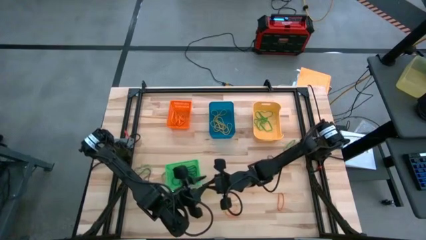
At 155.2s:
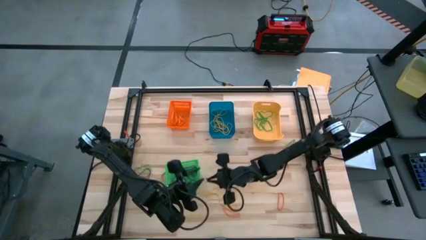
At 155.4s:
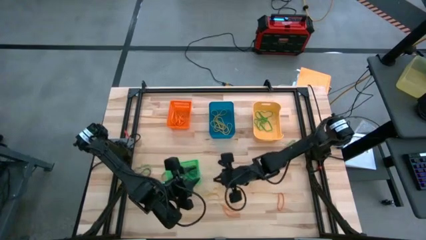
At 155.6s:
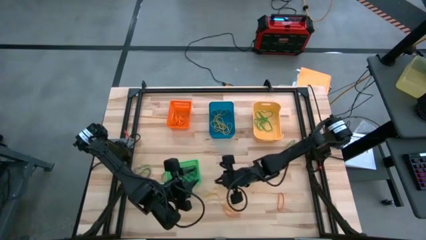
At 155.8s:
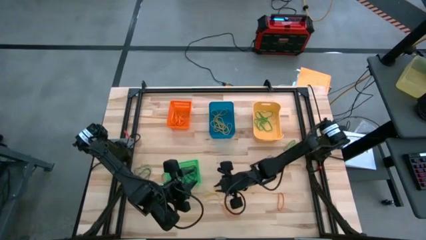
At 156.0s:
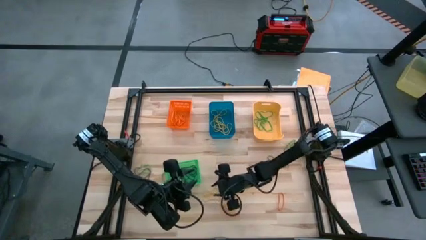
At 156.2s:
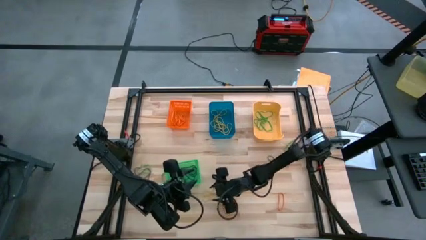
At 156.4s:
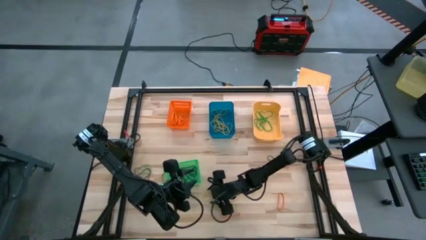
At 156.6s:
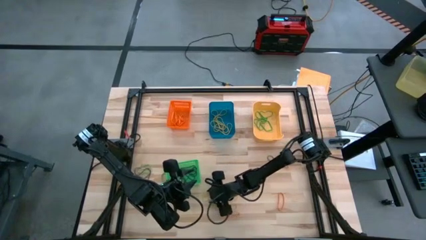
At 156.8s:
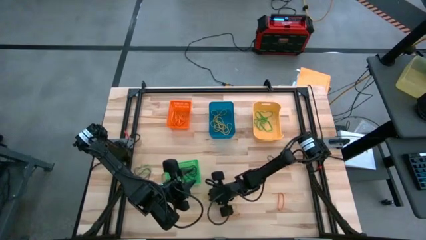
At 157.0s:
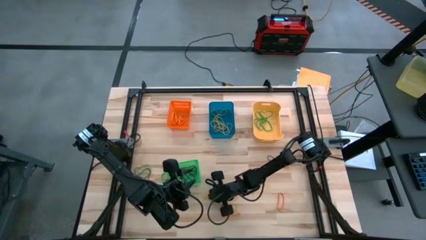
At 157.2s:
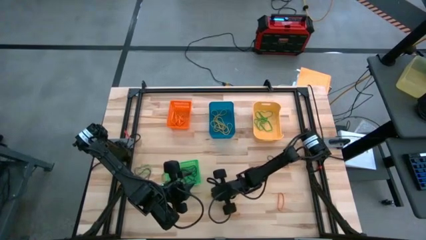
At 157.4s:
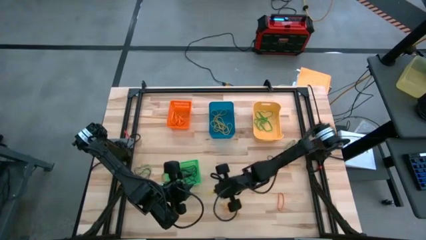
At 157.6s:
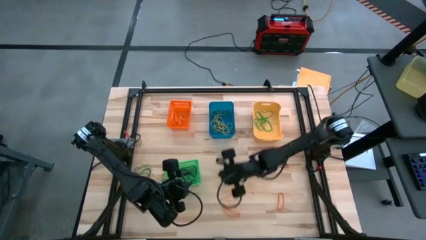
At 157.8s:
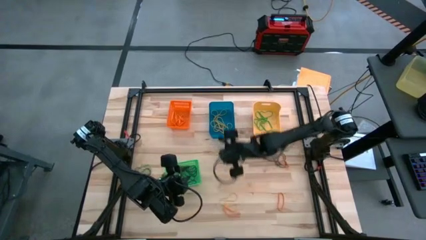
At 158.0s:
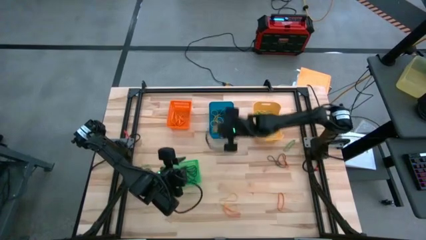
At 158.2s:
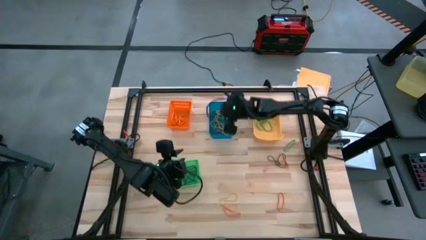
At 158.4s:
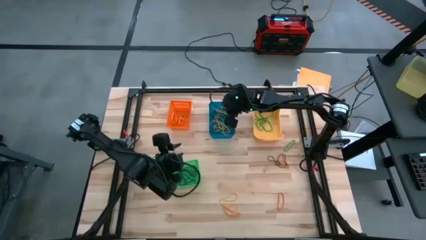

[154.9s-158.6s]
Task: Sort rubber bands into baskets
Put the yellow rubberband into the blue bin

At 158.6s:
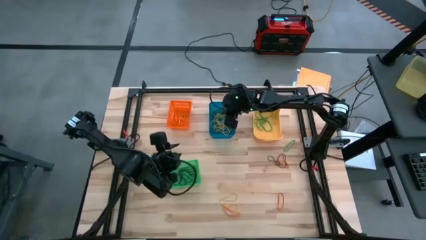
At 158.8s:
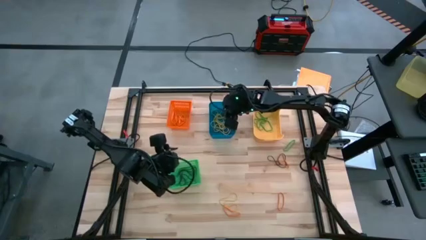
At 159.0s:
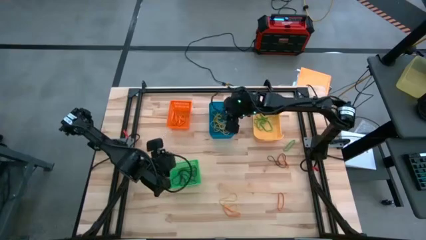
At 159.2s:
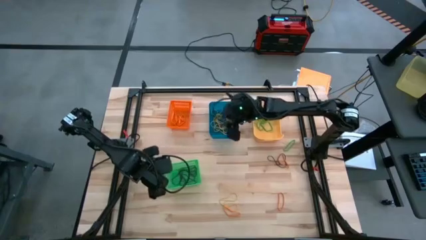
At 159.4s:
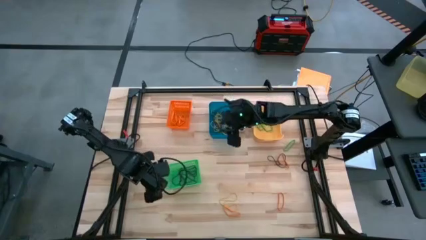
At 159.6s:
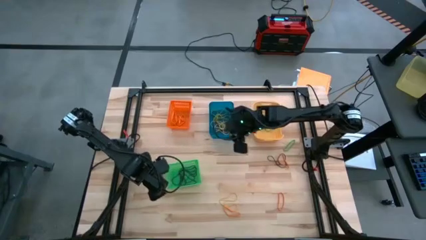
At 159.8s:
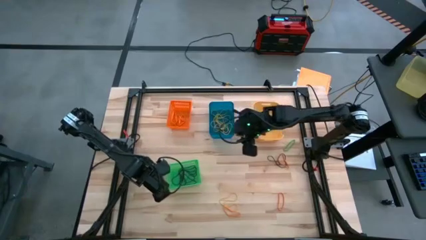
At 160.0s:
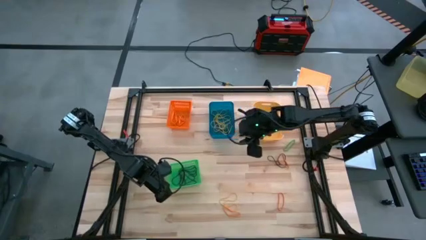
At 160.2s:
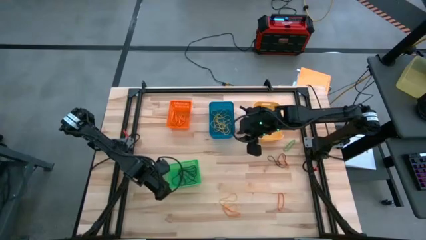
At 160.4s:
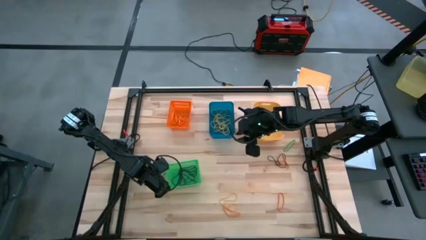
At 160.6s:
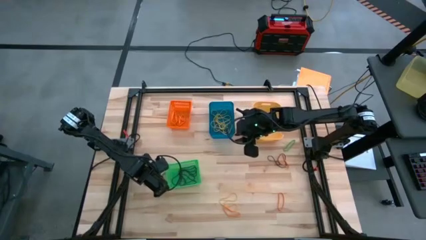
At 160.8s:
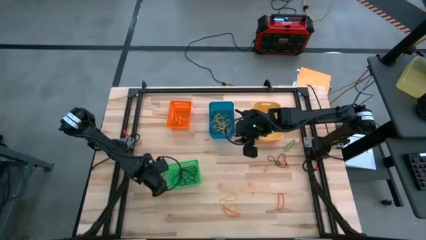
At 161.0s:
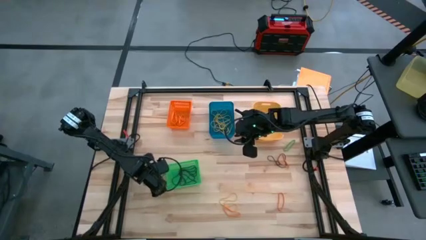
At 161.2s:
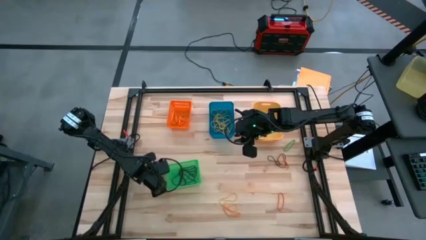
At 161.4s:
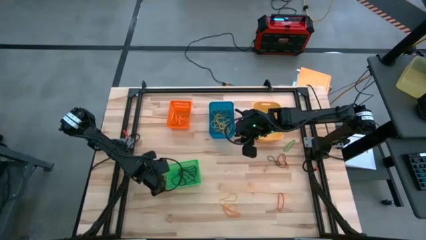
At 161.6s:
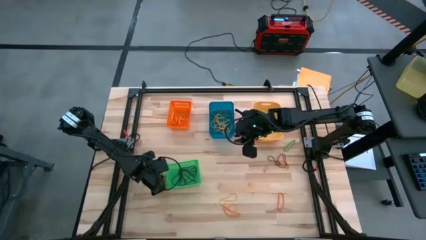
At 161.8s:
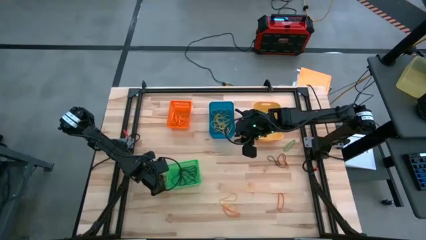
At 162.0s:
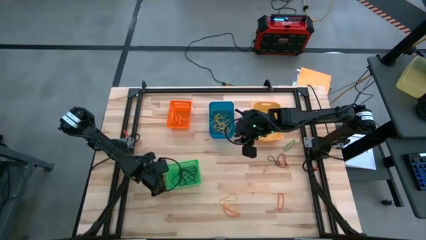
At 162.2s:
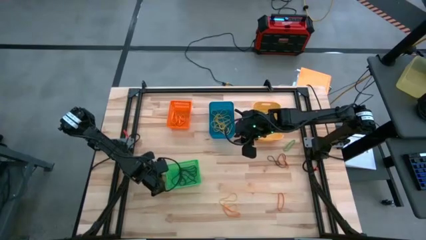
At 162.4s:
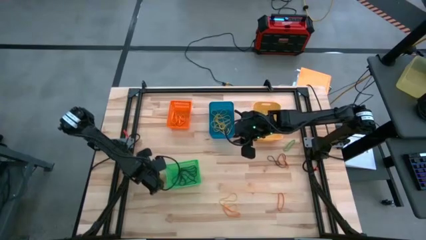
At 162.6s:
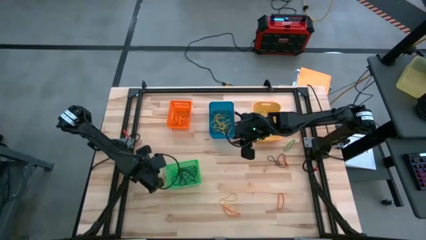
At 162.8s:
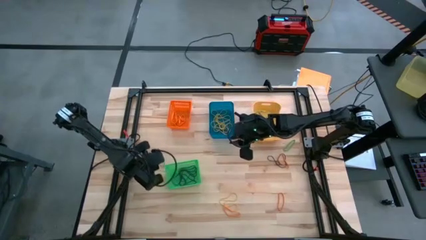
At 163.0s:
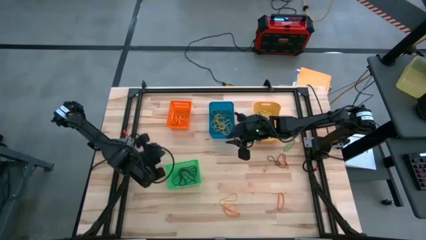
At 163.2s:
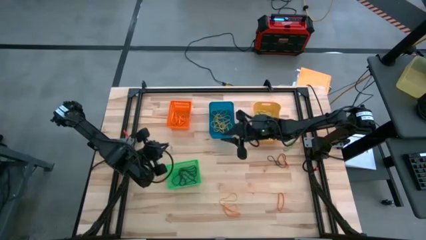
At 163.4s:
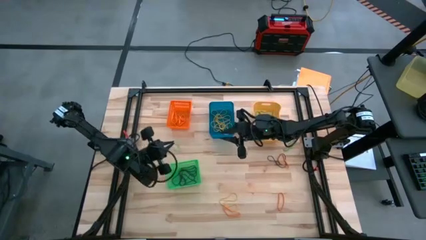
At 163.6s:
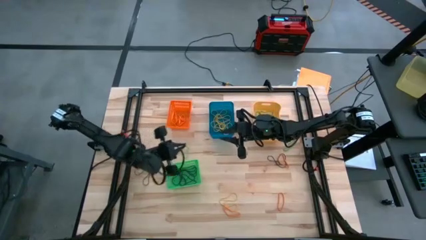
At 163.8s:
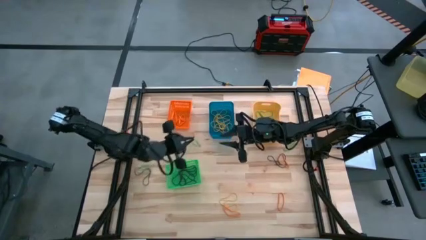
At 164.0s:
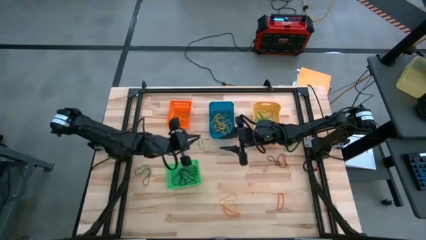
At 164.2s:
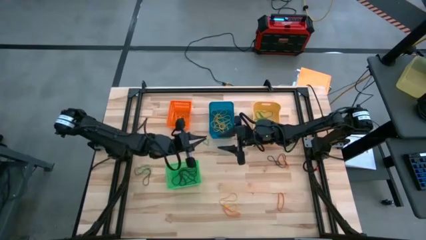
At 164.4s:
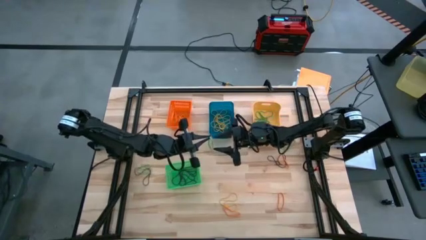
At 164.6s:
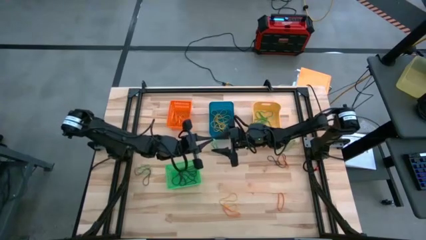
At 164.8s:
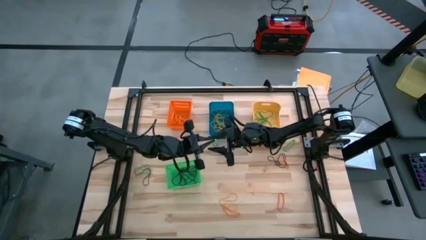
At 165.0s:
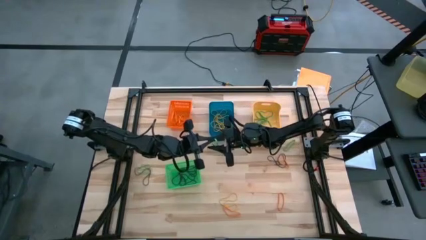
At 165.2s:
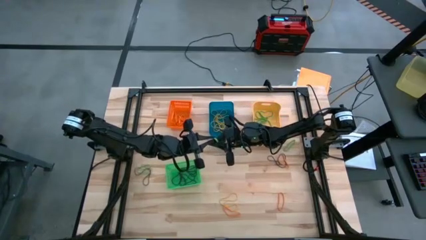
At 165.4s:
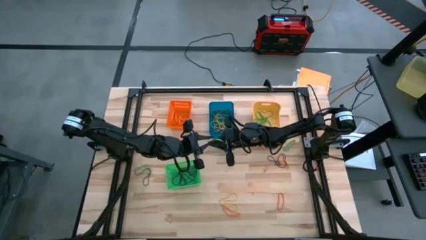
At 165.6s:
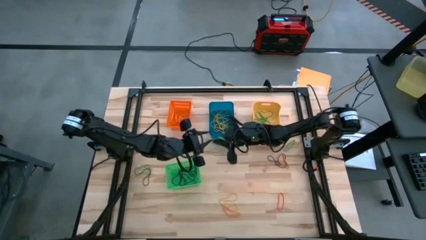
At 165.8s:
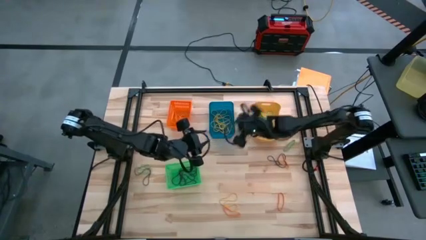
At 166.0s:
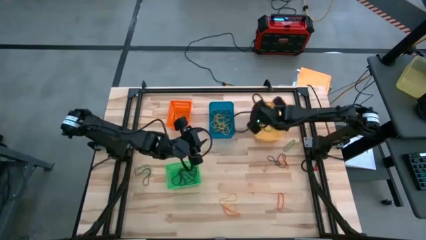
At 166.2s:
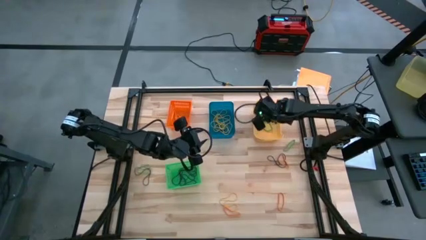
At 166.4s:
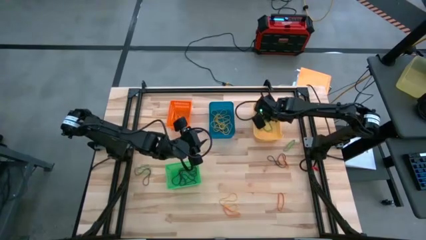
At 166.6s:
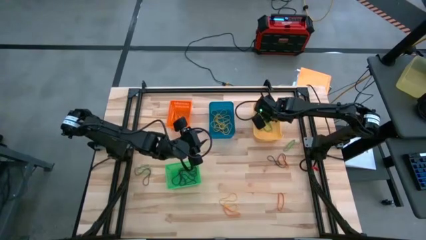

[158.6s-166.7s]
Put the green rubberband into the yellow bin

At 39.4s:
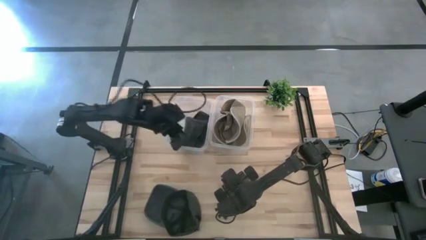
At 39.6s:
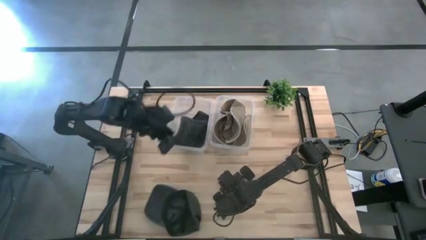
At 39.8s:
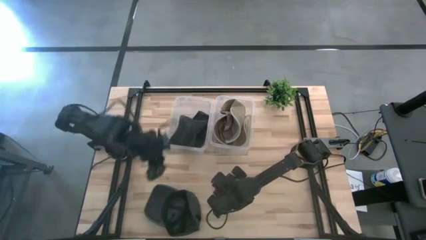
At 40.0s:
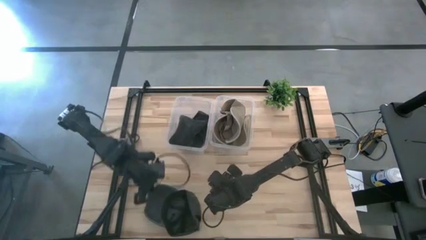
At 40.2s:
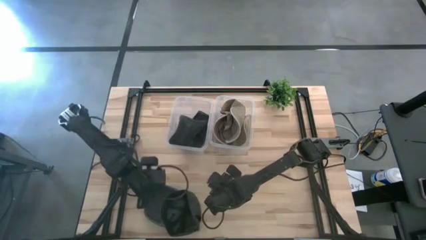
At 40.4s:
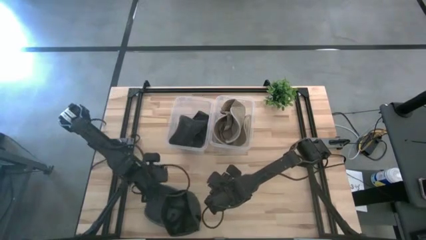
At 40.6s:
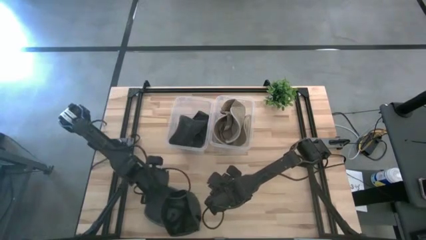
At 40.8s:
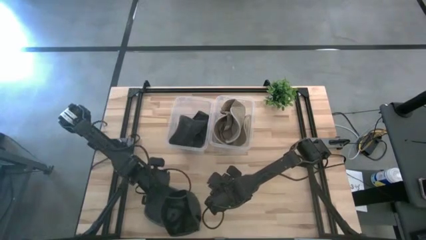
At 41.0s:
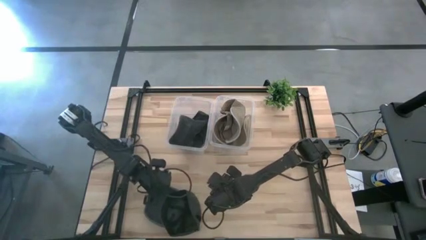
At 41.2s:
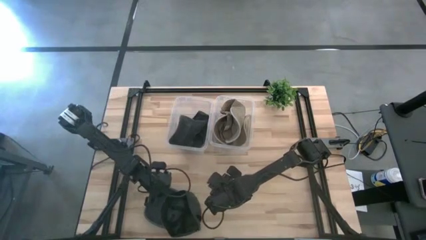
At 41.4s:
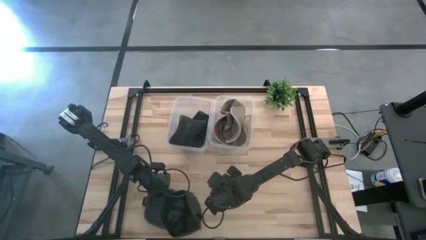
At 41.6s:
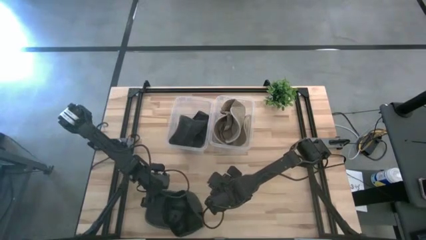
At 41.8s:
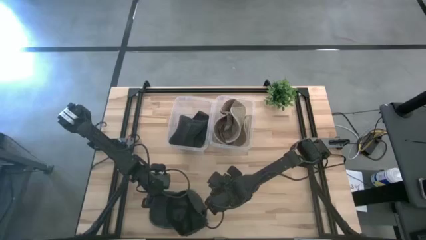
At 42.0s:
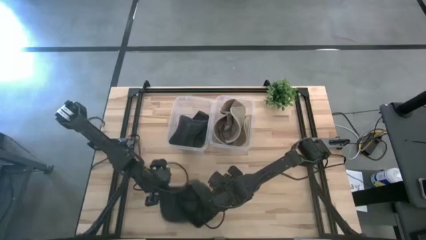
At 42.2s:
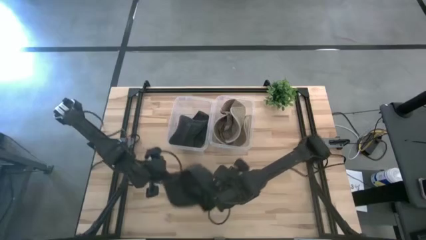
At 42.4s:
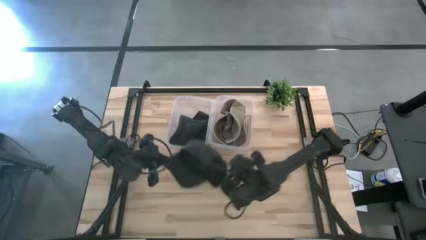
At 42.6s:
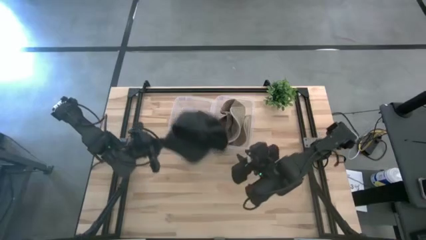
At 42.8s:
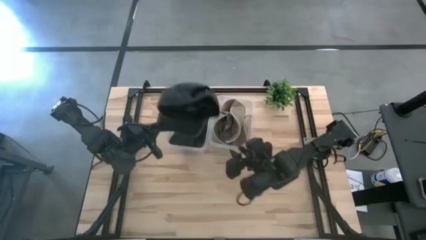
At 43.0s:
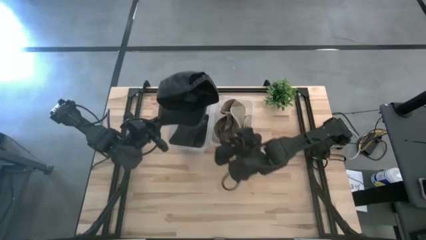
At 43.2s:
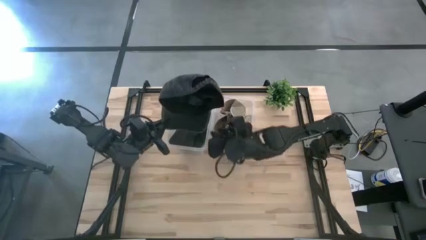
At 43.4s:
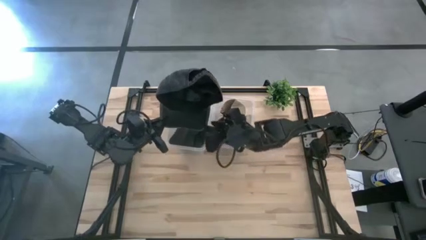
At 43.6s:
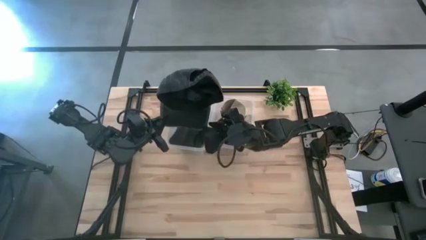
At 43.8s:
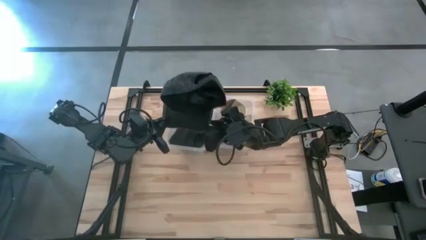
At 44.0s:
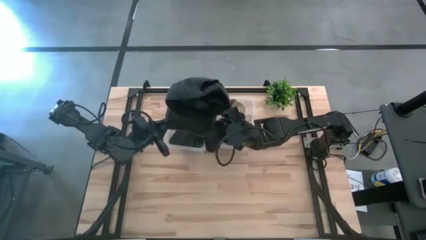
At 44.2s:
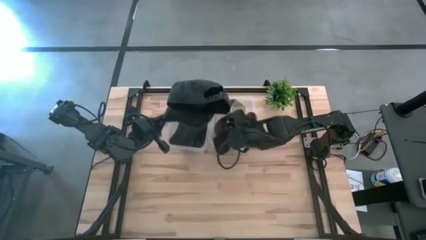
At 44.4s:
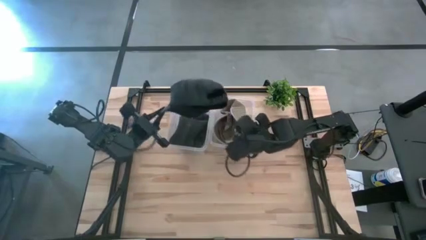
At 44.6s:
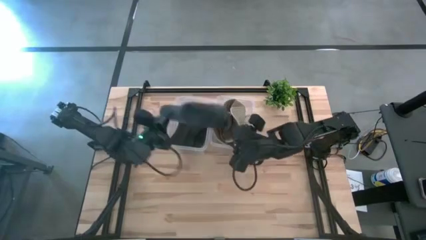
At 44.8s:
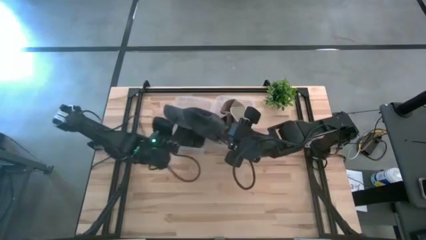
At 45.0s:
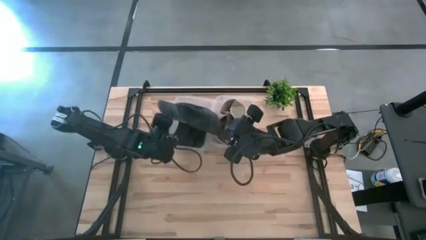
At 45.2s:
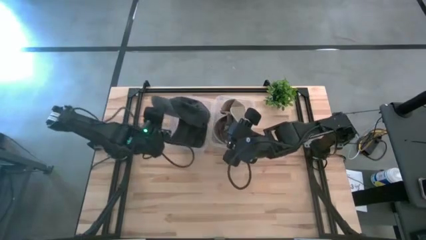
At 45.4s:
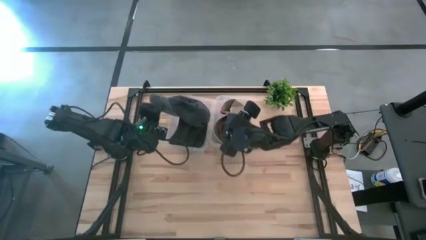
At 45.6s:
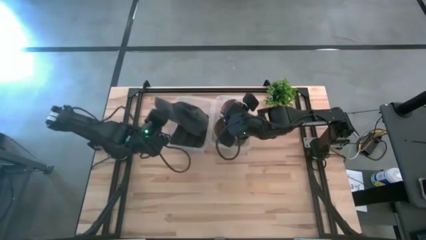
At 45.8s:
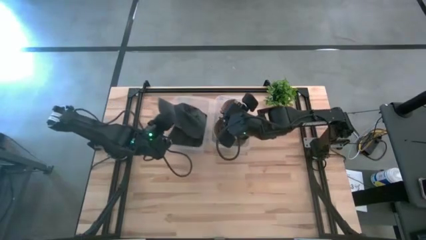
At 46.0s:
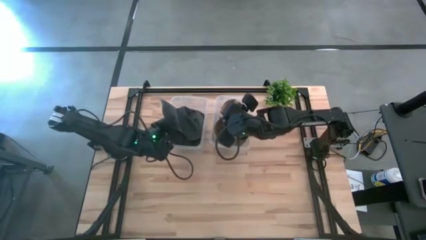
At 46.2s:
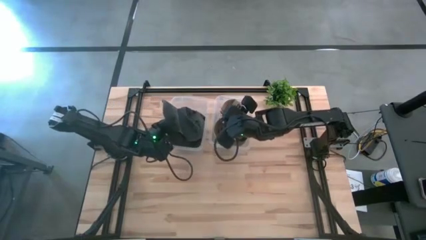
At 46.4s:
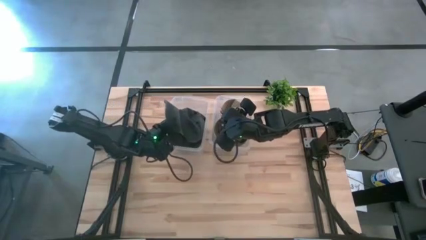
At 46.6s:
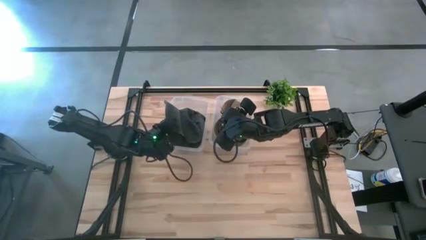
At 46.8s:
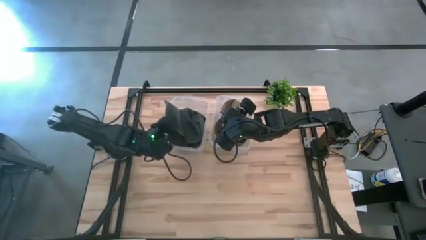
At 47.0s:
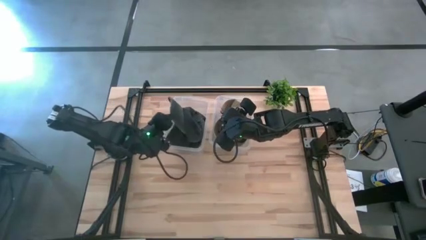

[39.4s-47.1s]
Task: Pick & Place hat
Put the black cap into the left transparent bin
